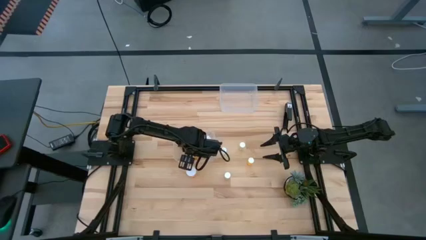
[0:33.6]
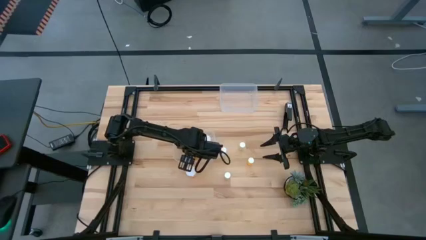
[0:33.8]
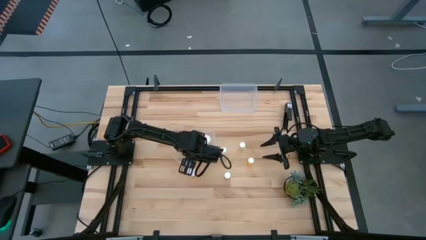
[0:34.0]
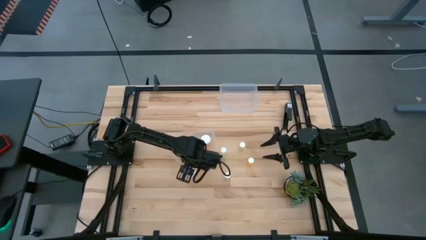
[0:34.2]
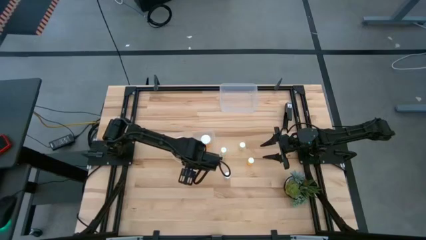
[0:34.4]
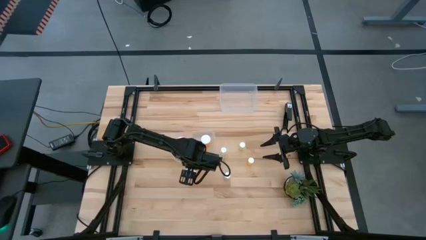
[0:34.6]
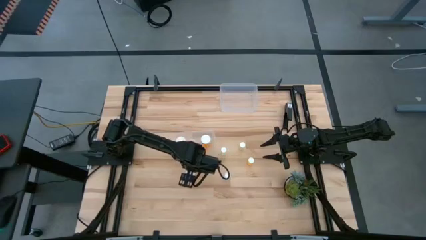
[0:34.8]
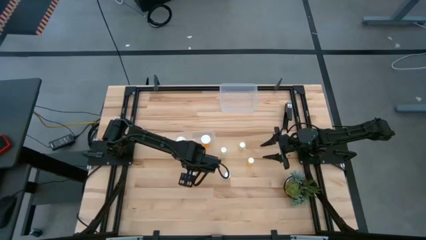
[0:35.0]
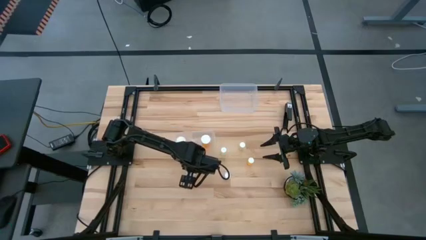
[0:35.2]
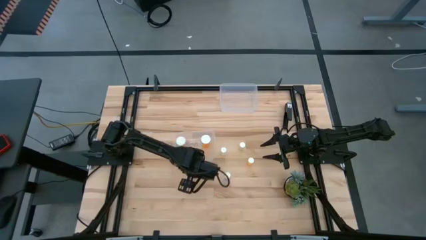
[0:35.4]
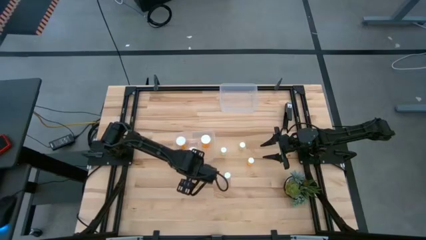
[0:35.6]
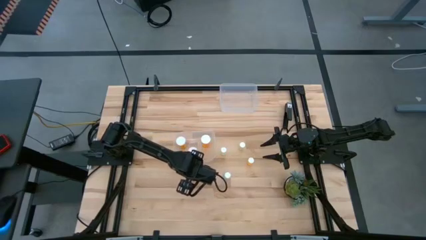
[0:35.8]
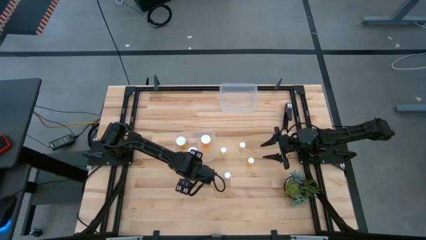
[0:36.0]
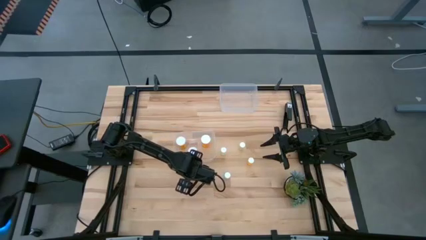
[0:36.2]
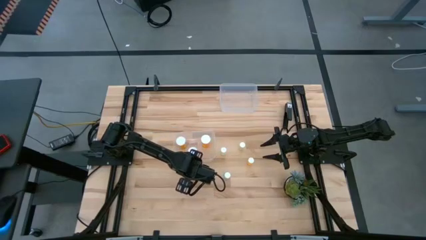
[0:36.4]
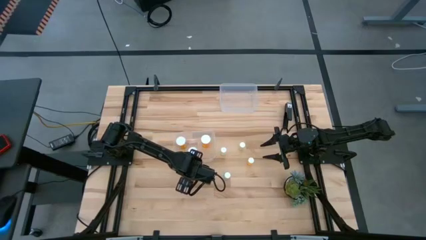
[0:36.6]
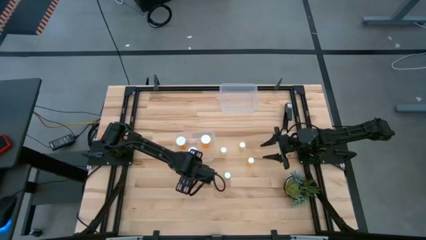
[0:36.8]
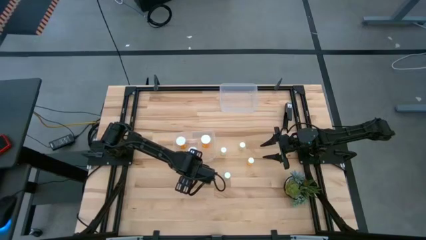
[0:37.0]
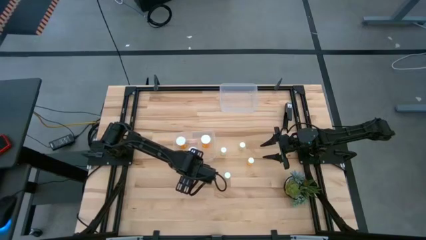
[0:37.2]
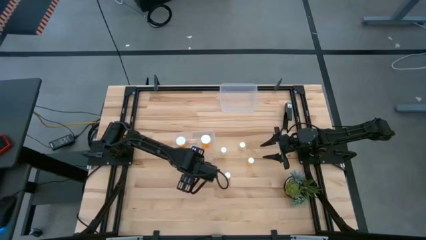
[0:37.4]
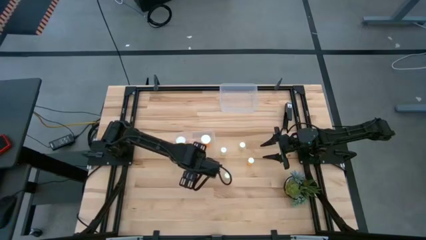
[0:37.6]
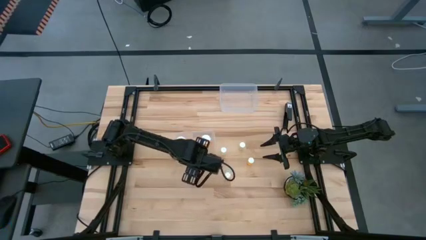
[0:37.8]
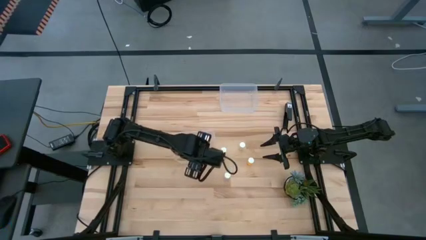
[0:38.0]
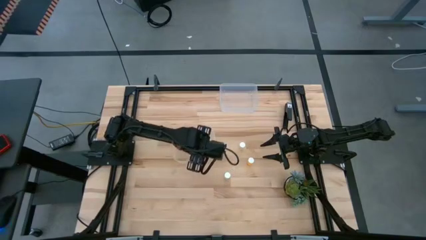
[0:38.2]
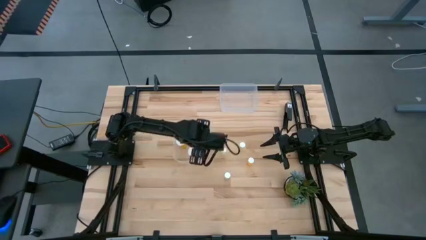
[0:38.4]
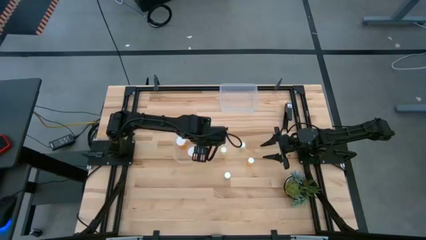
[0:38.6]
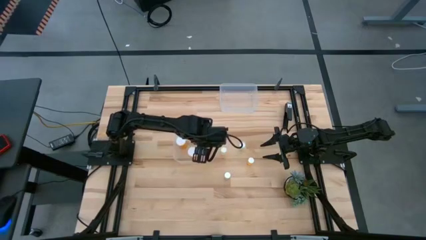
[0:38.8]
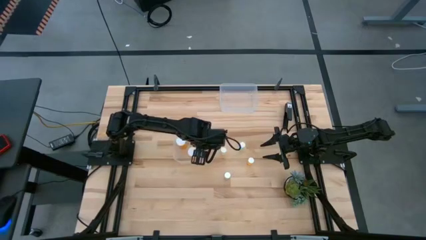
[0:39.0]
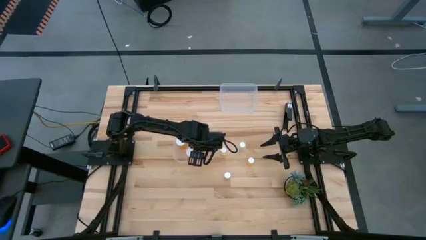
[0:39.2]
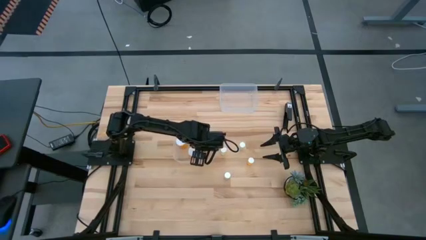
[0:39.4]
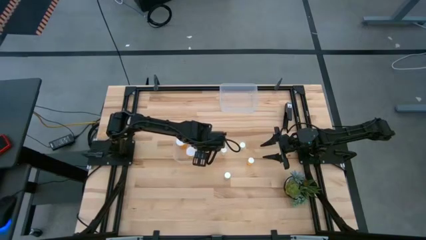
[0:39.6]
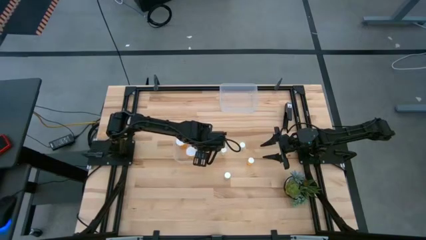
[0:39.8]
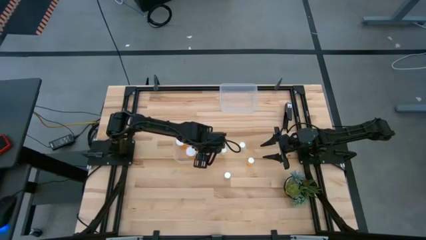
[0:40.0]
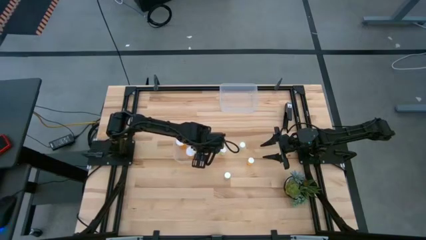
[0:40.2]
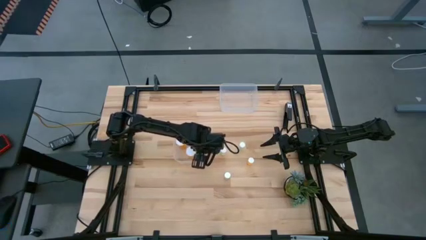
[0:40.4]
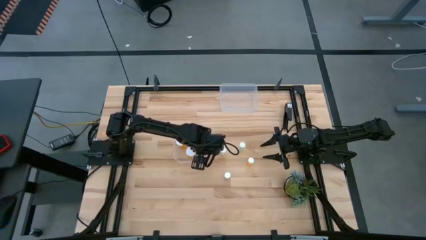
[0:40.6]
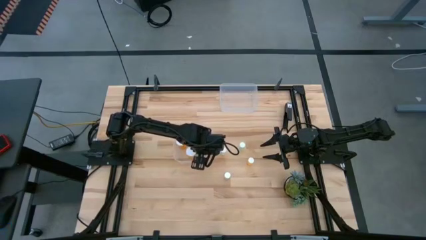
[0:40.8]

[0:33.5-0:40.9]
Task: Pick and place medicine bottles into bin by pill shape (circle, oval)
Put the large orange pill bottle into the bottom transparent bin

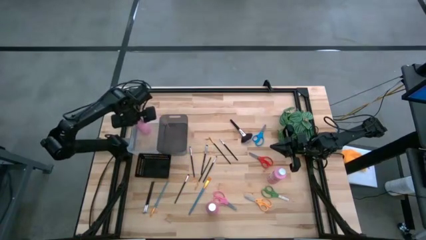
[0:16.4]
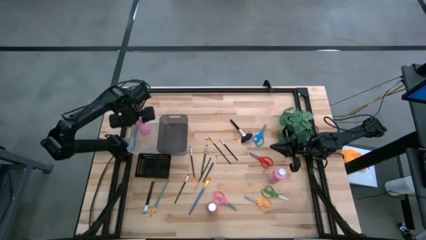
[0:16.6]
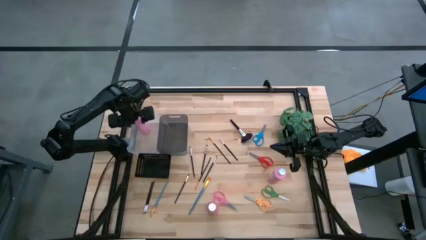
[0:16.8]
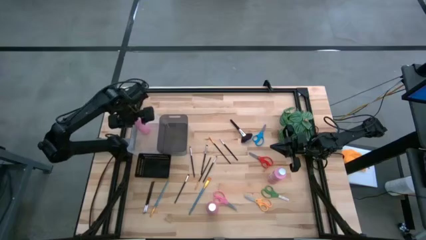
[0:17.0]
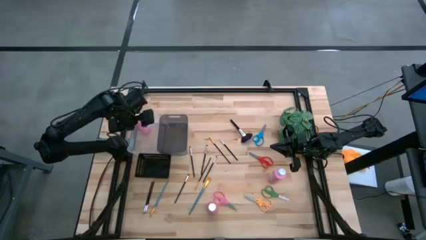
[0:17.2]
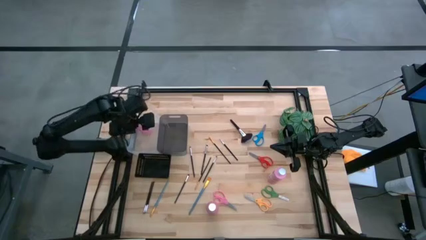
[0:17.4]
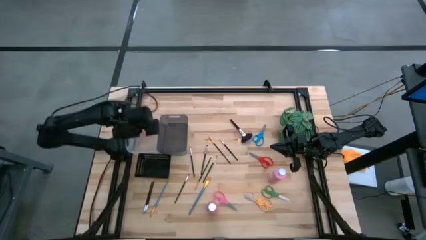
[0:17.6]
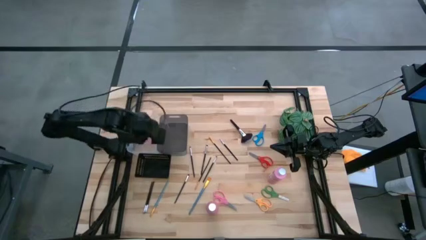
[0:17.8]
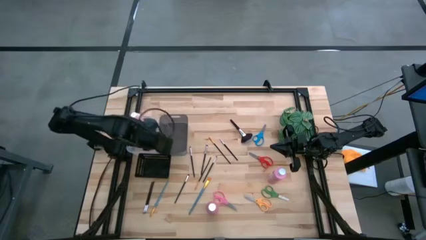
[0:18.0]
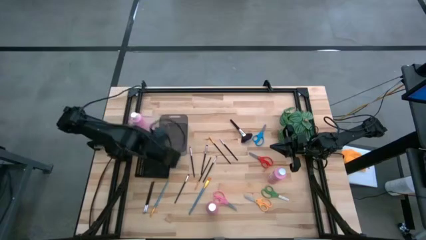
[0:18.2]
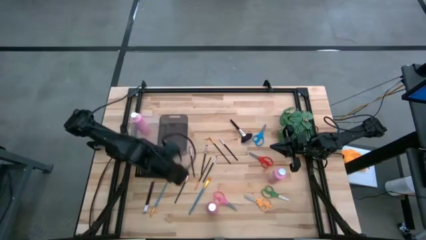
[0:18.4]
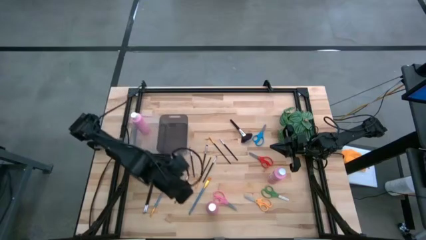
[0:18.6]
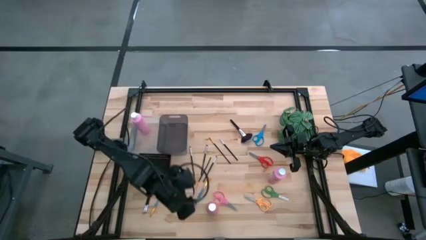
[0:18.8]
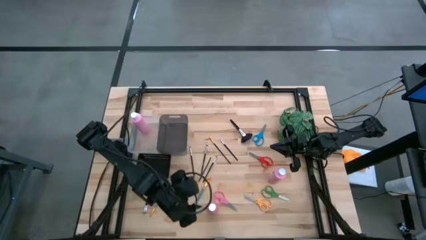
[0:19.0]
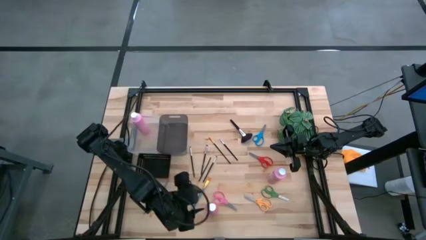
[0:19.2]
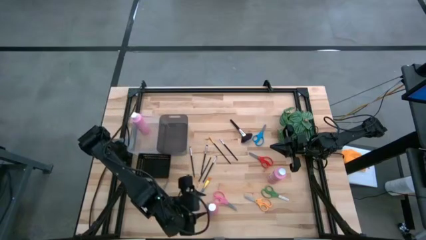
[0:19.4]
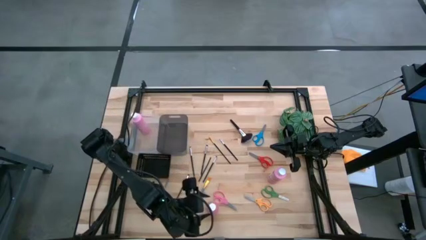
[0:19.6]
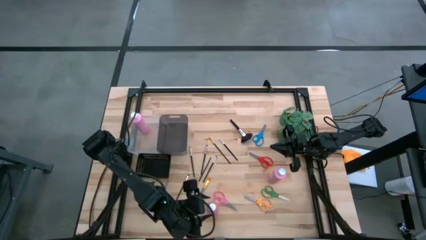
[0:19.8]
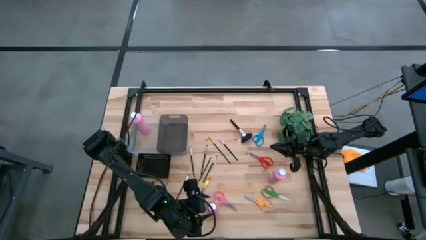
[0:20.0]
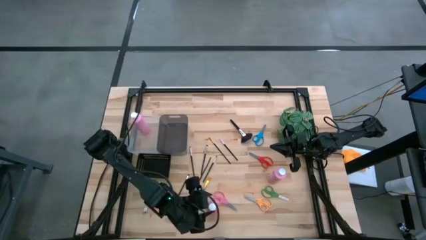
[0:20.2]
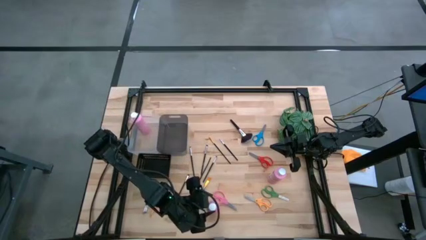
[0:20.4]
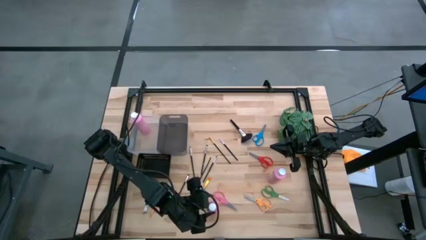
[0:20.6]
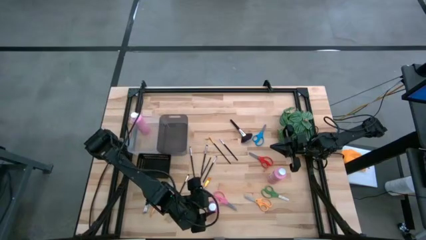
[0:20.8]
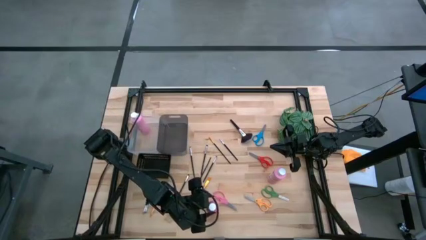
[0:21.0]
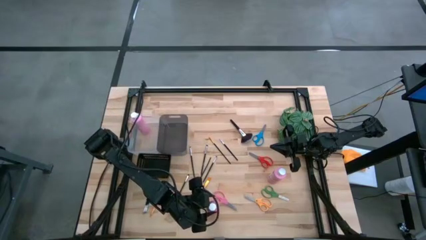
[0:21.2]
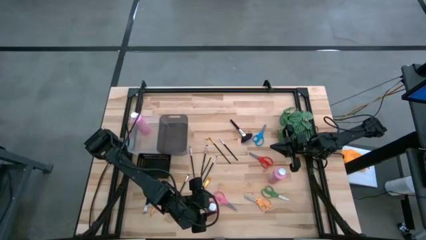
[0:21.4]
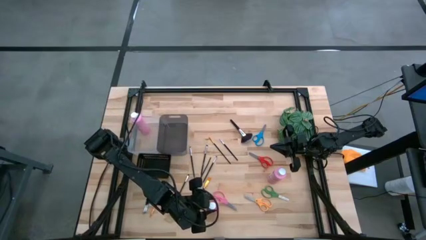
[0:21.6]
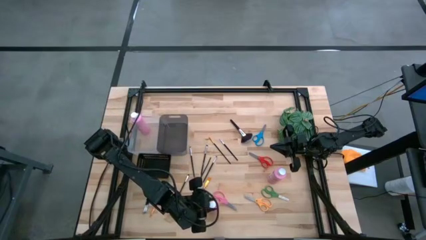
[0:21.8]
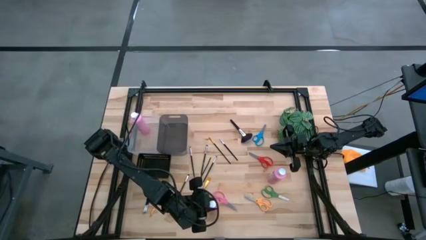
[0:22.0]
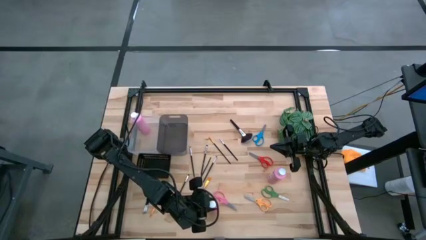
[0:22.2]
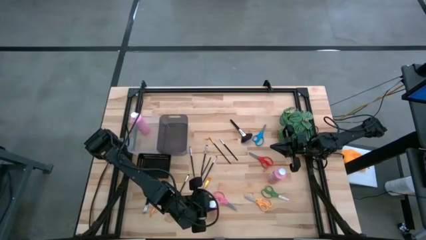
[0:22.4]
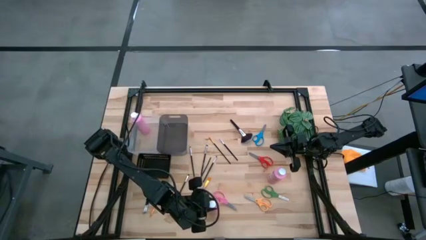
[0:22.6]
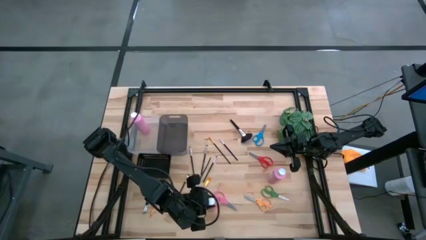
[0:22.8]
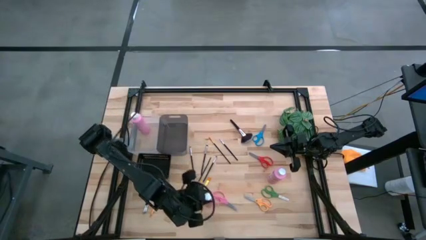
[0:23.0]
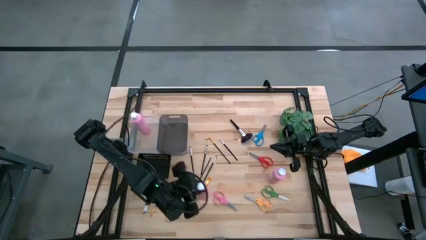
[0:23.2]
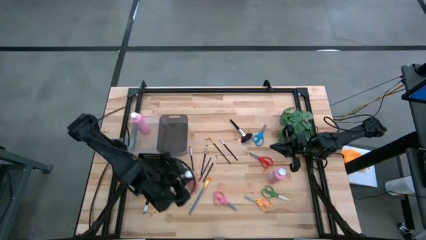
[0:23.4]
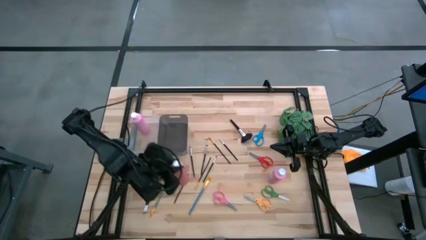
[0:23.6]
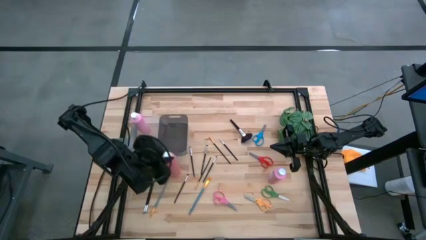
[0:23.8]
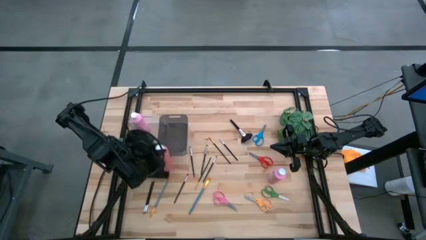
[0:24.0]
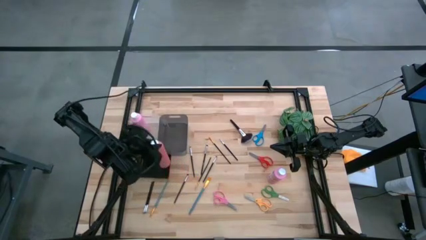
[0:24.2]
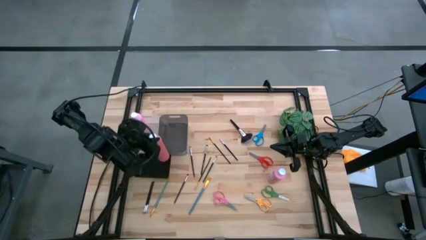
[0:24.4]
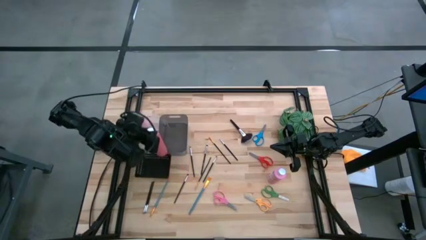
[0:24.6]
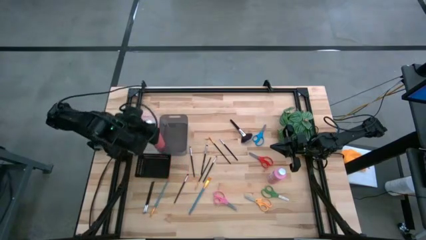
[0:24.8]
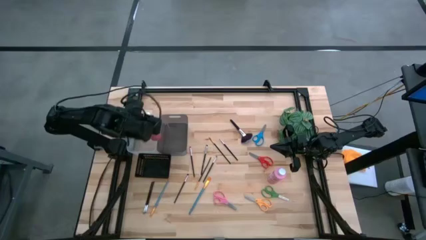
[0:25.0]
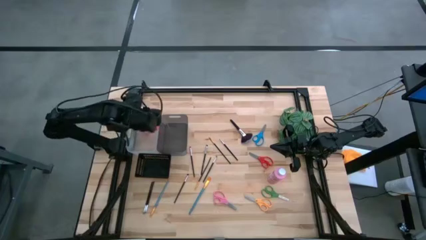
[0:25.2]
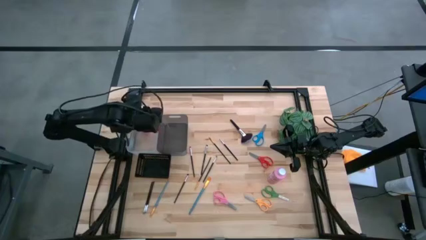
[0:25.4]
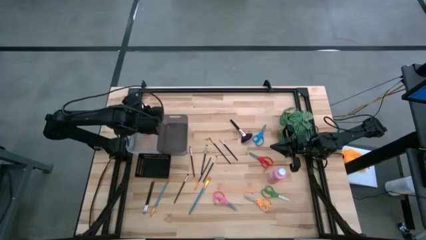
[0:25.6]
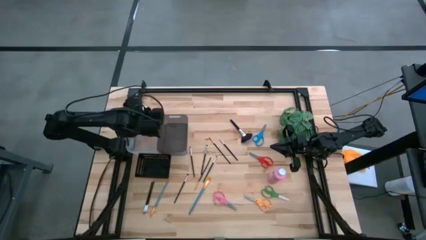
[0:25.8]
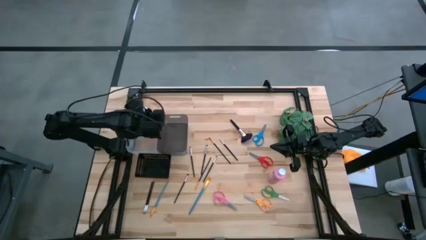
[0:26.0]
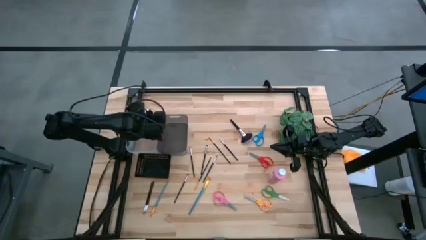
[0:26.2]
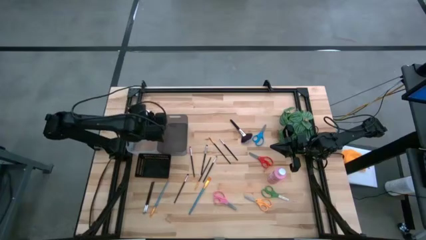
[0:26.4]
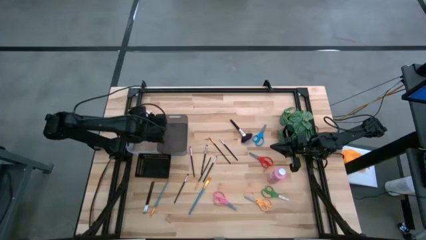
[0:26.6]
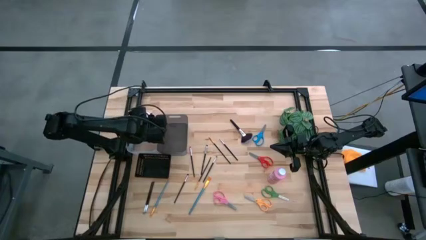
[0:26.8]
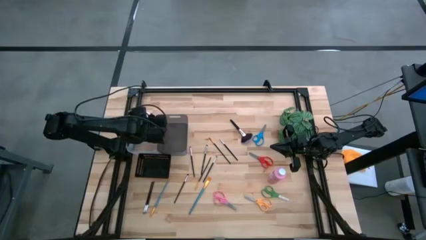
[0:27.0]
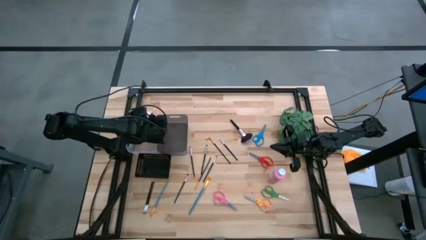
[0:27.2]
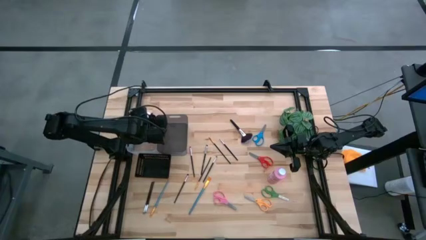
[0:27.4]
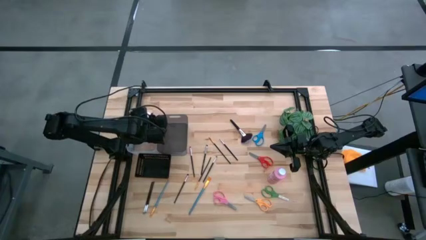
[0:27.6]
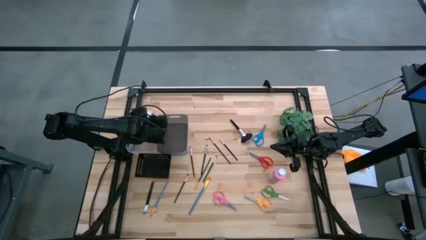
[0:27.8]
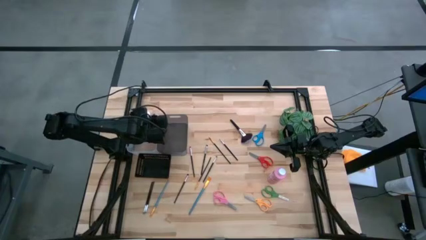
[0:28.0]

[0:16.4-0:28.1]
Task: Pick & Place Paint Supplies
Put the dark pink bottle into the white bin
